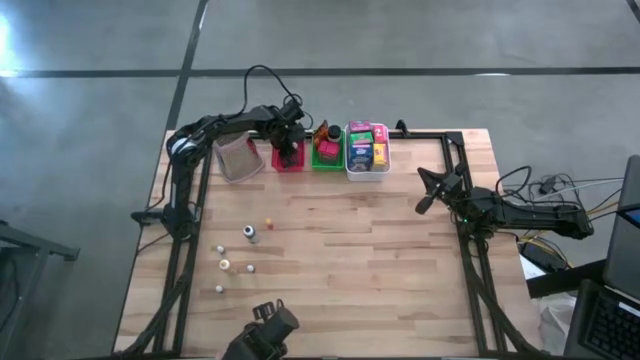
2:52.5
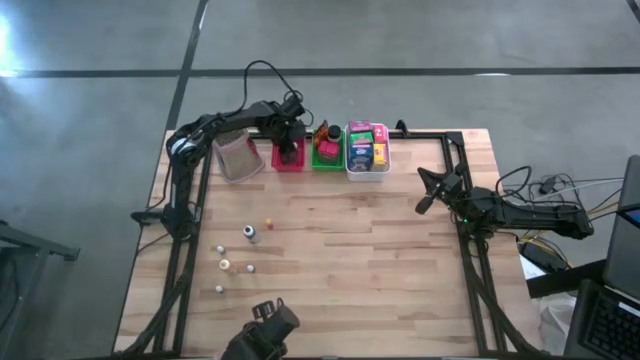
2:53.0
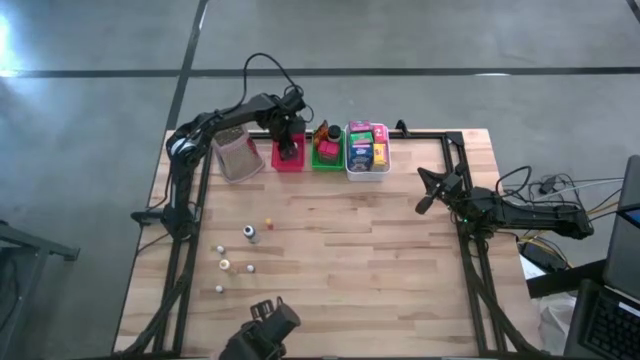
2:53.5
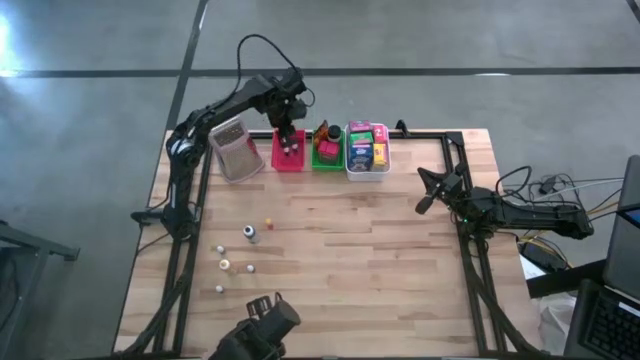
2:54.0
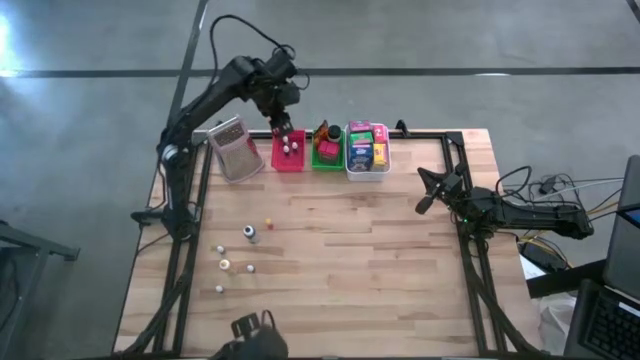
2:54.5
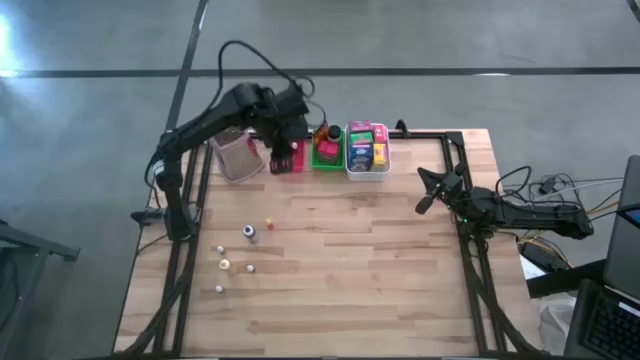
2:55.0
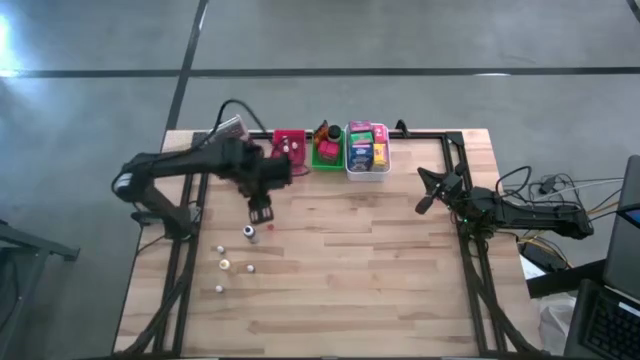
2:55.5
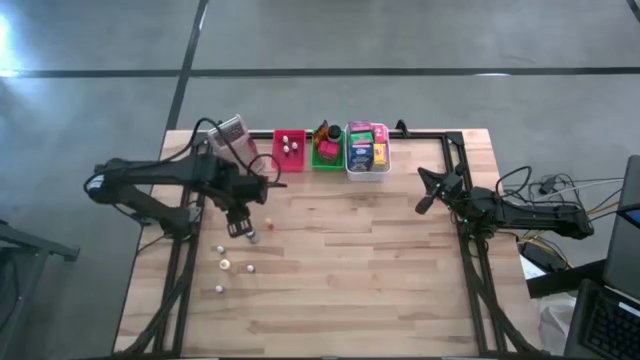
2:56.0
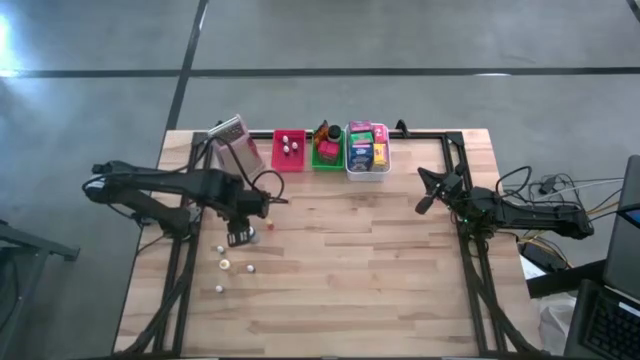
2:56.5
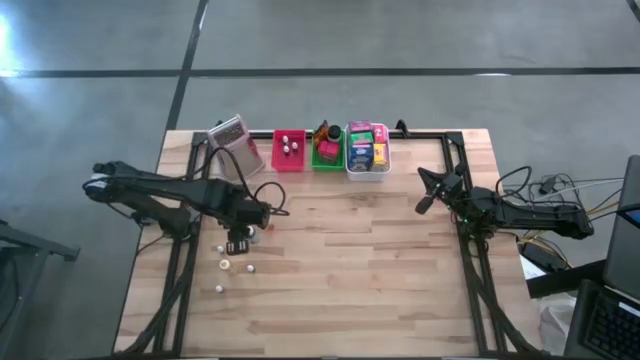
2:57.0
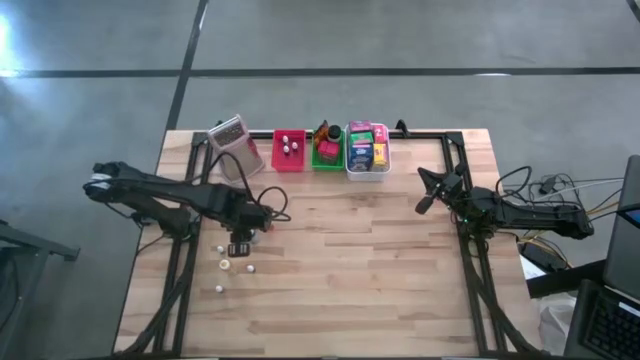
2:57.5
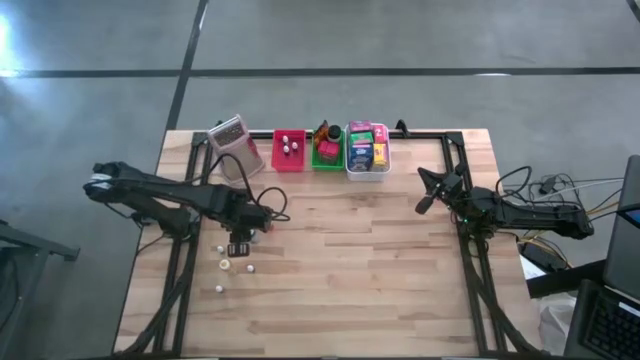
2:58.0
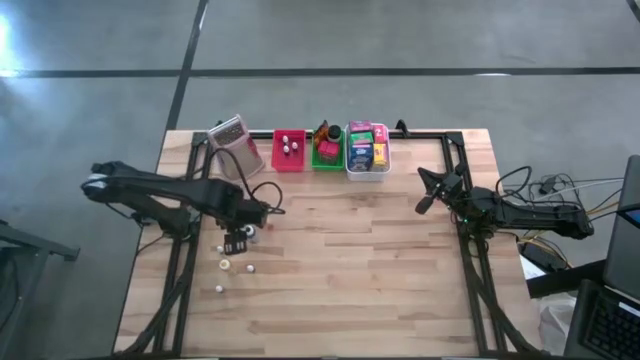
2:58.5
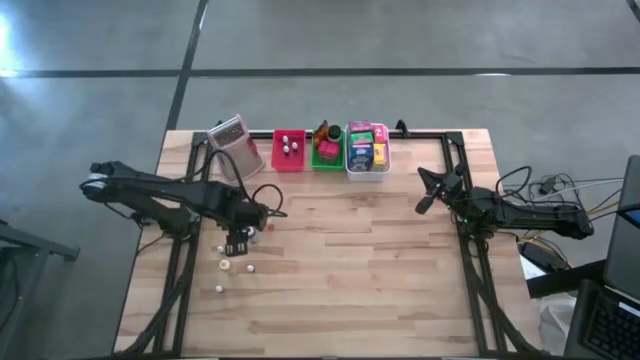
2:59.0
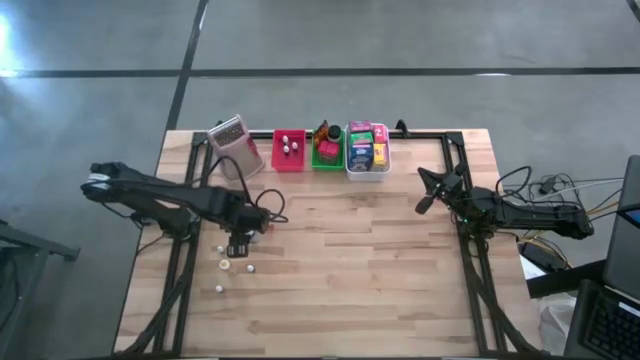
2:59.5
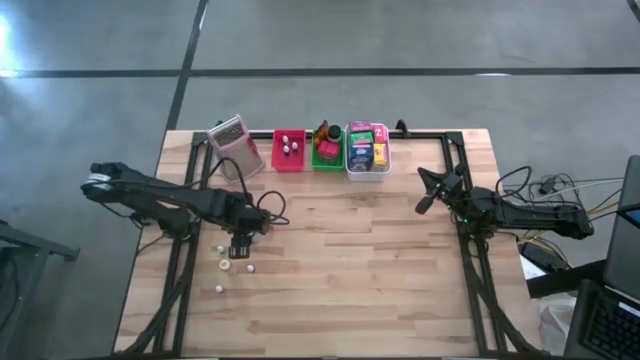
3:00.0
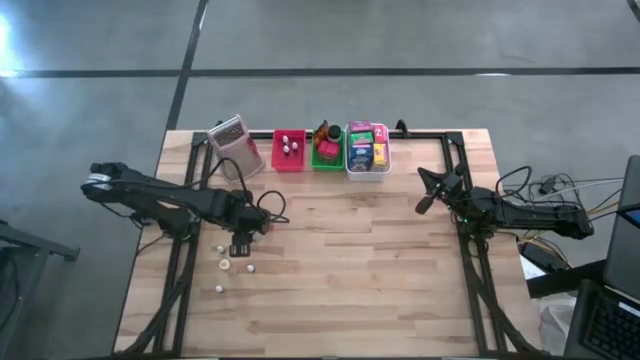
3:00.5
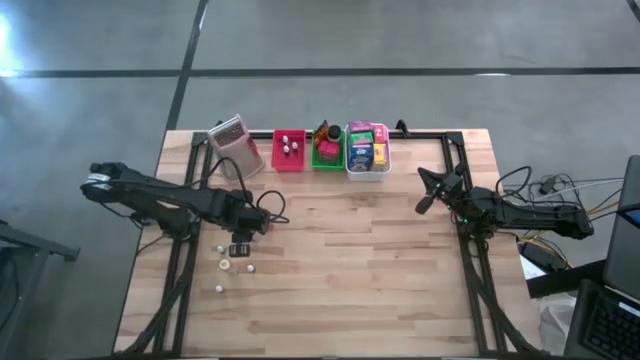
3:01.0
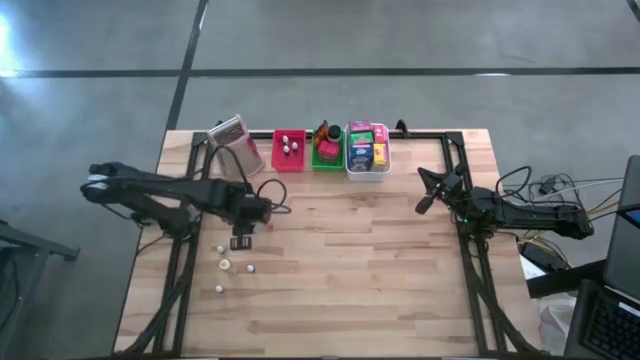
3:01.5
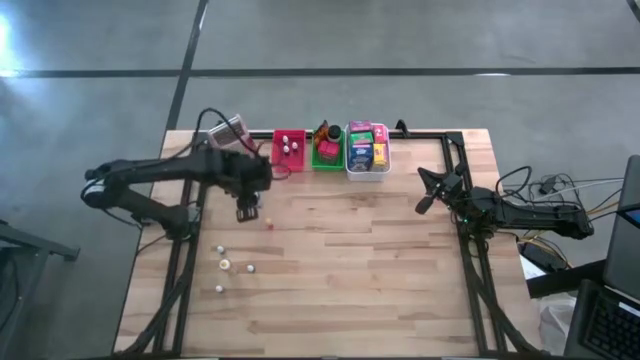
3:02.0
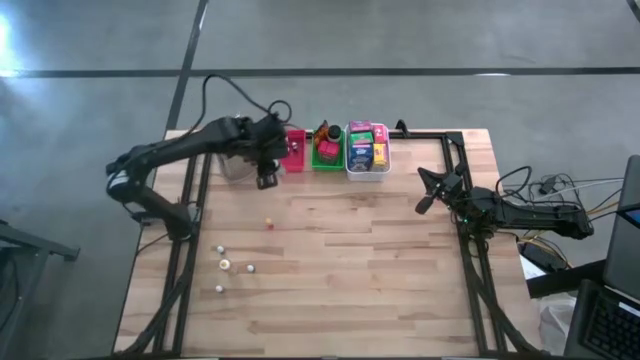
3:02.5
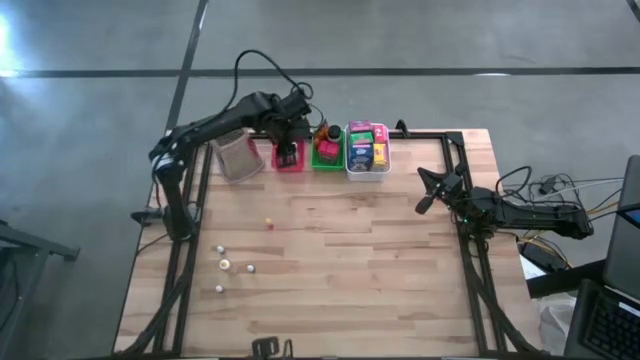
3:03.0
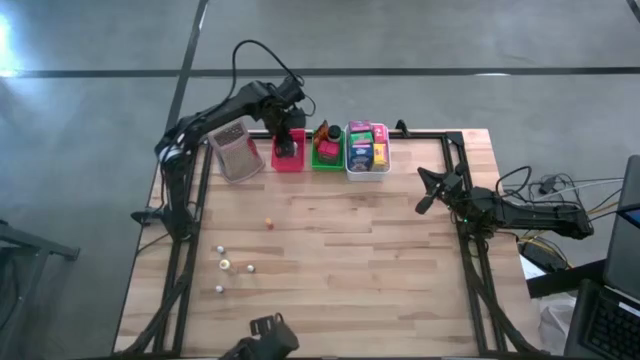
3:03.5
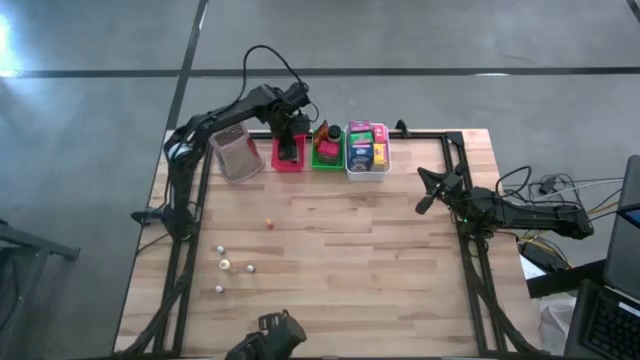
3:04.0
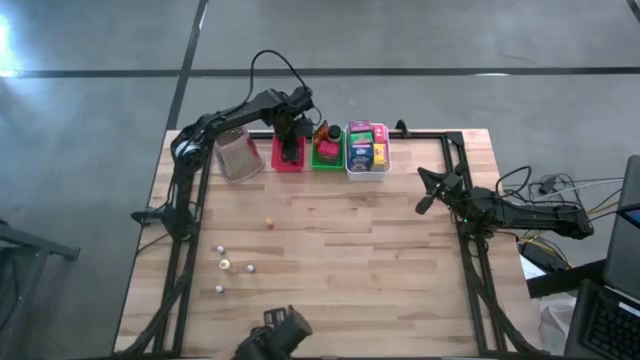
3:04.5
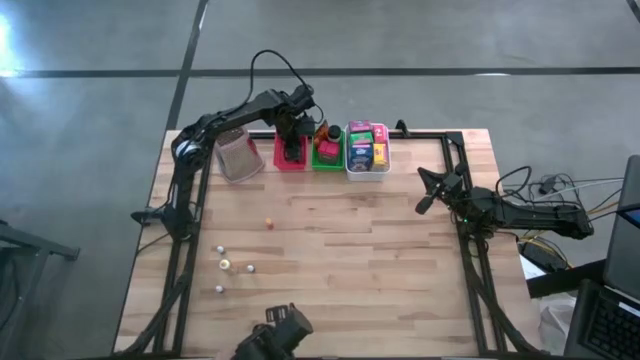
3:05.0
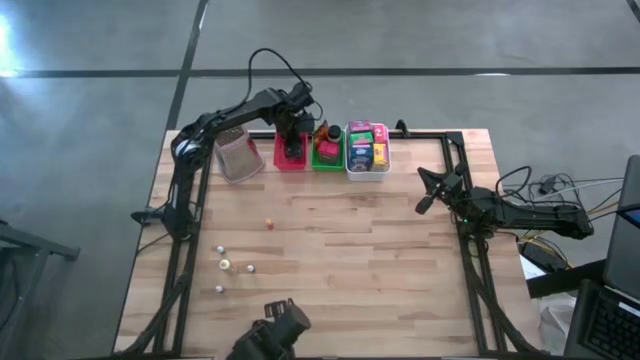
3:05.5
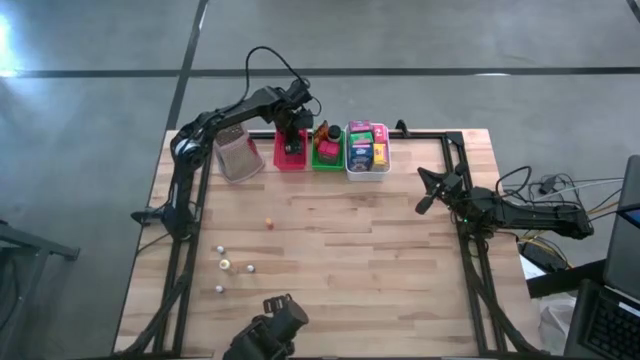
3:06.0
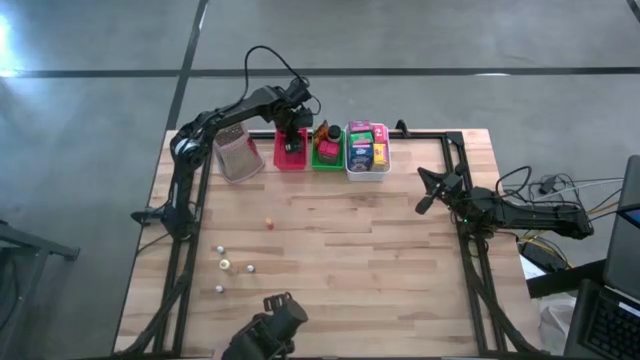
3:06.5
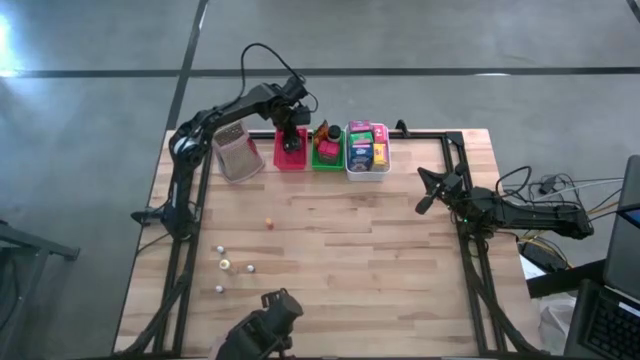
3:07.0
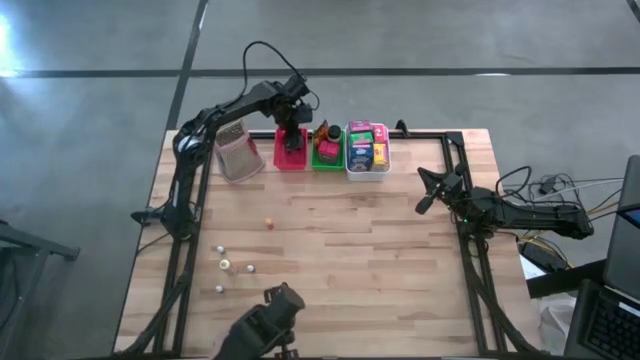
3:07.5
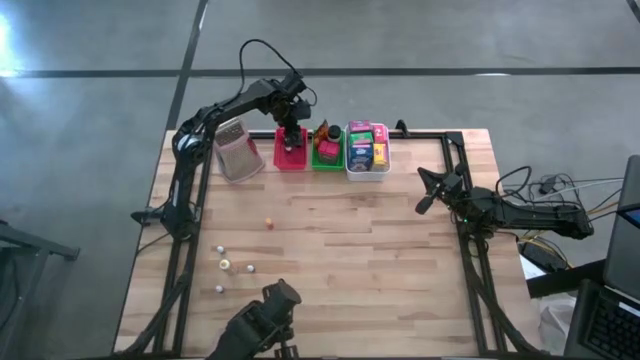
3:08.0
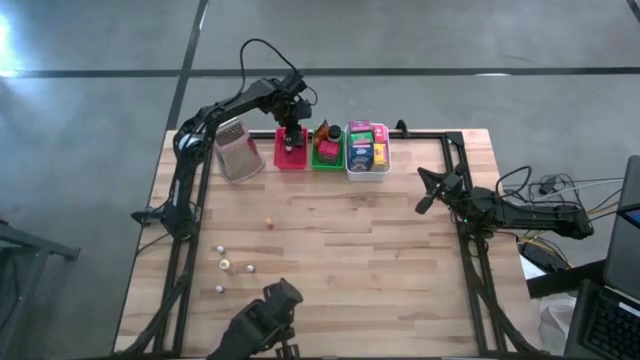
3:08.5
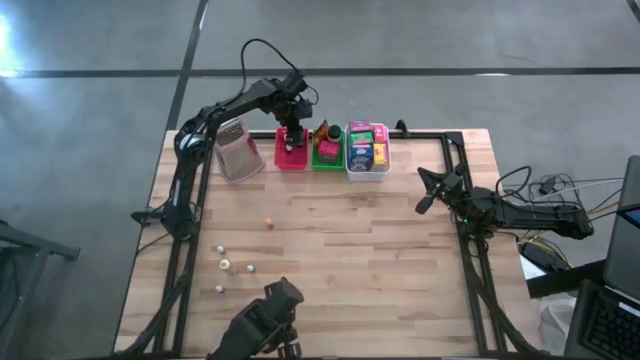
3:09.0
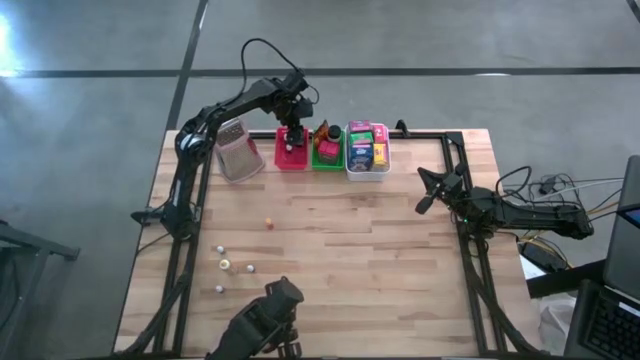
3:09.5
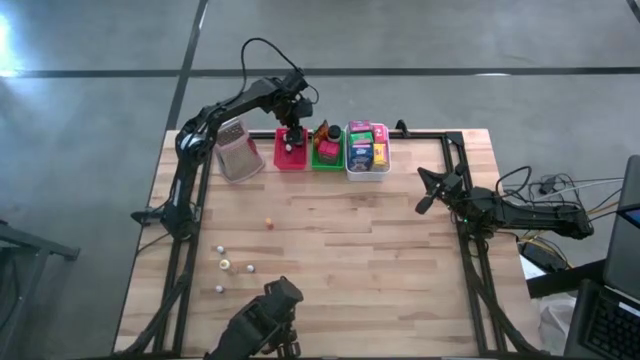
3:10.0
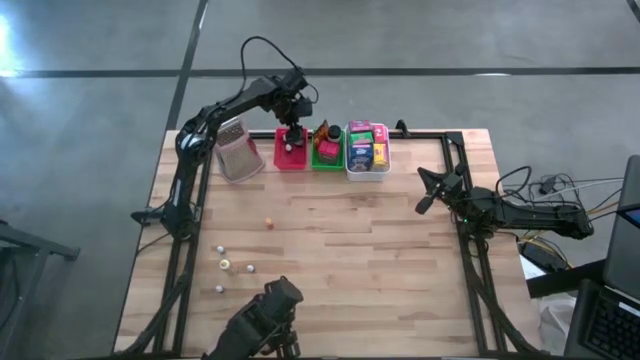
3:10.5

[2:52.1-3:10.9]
Task: Pick & Place Kitchen Items
Put the large black food coloring bottle into the red bin

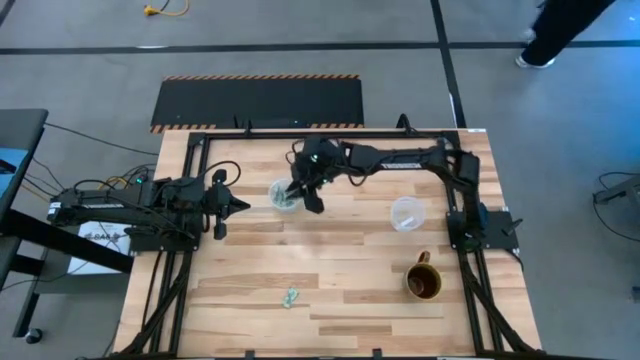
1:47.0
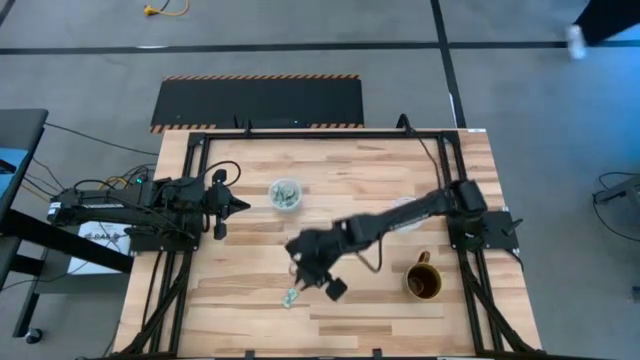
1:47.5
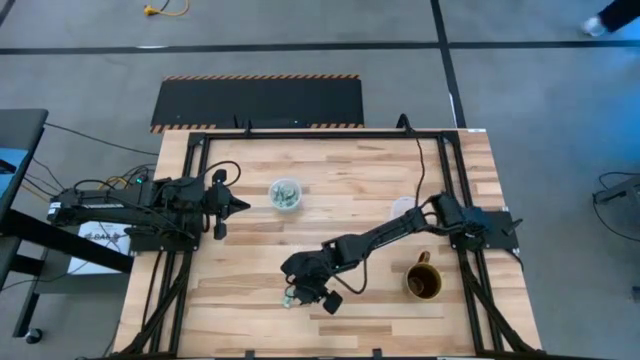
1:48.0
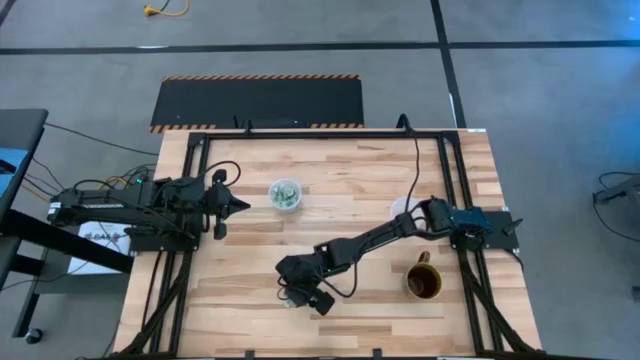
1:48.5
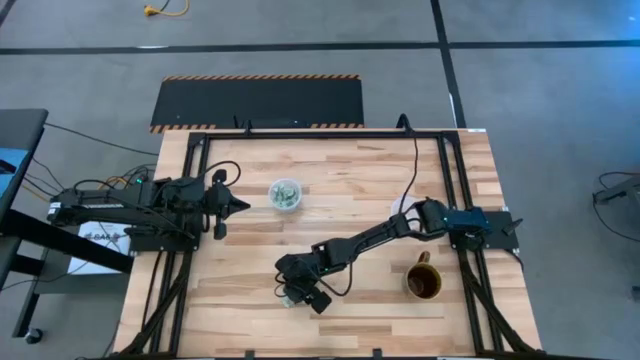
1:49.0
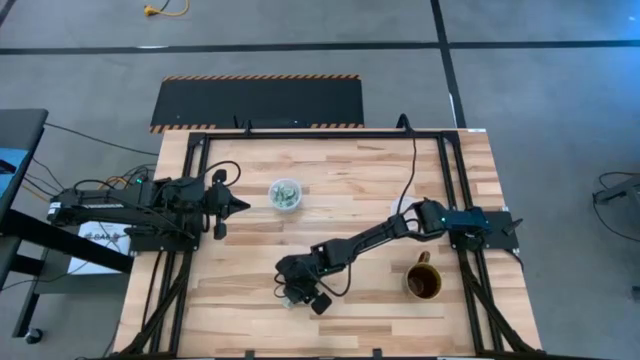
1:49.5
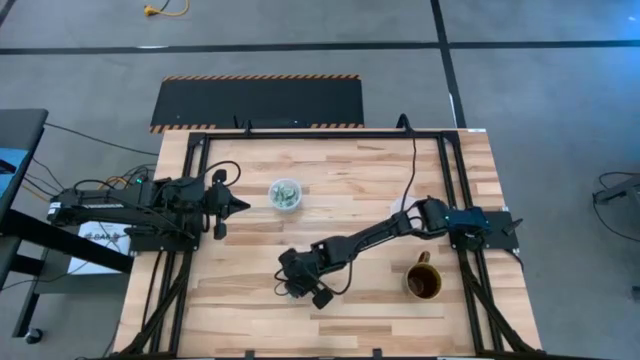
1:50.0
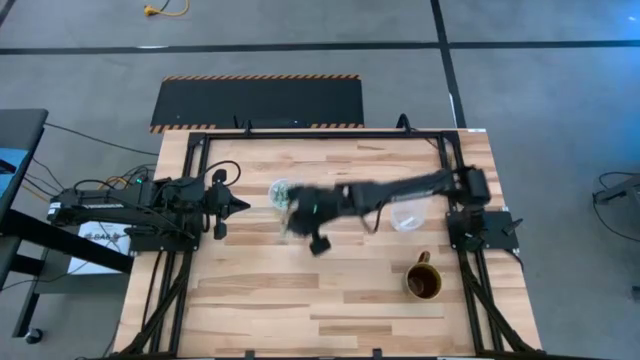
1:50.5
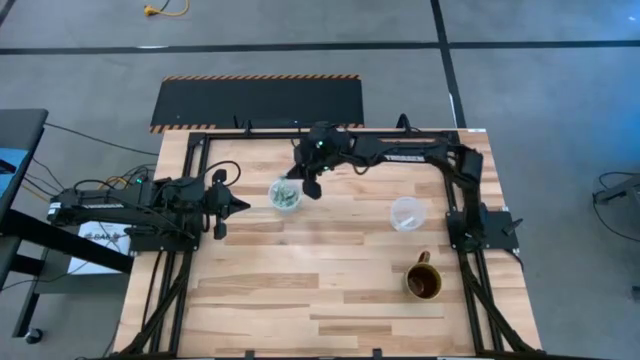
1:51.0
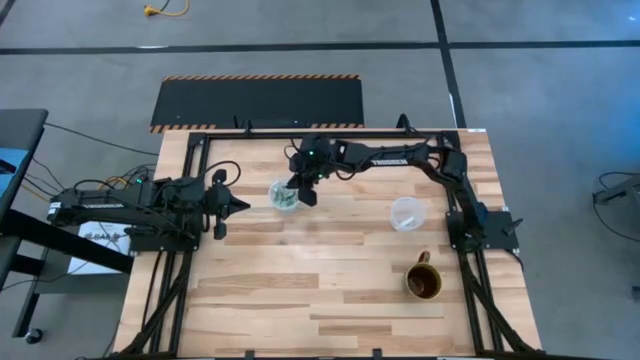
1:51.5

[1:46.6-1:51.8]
Task: Pick and place Stevia / Truvia into bins
Put the white stevia packet into the left transparent container
